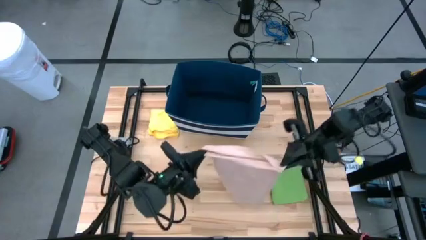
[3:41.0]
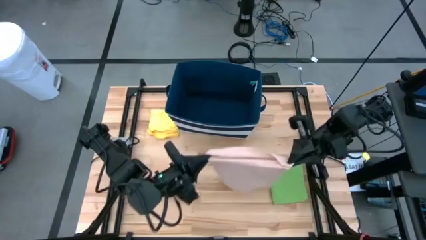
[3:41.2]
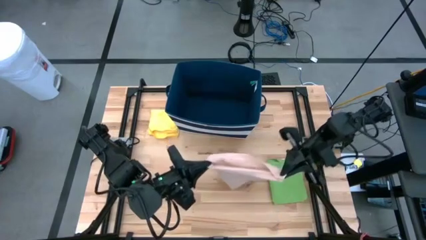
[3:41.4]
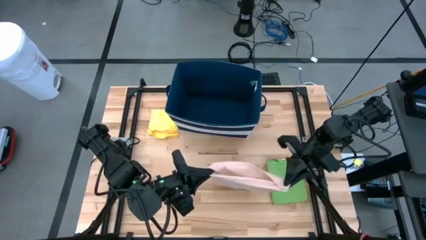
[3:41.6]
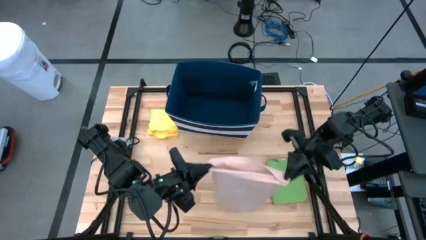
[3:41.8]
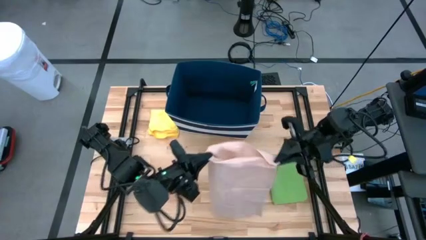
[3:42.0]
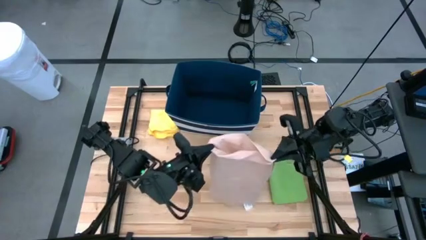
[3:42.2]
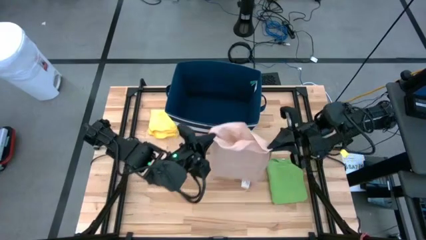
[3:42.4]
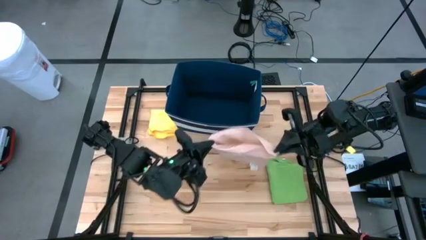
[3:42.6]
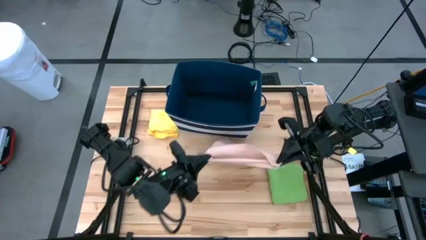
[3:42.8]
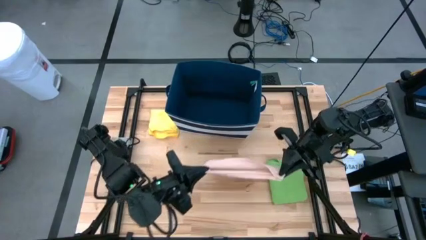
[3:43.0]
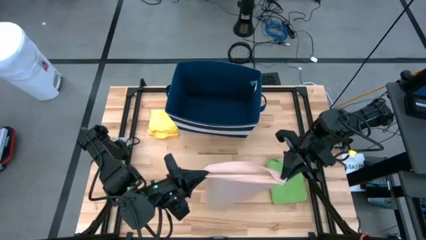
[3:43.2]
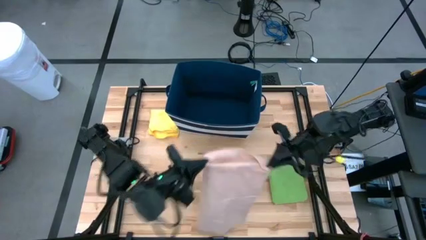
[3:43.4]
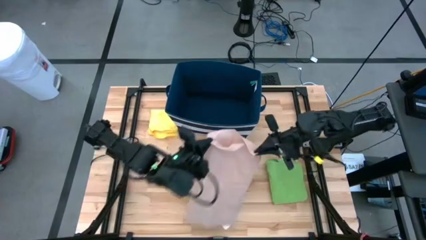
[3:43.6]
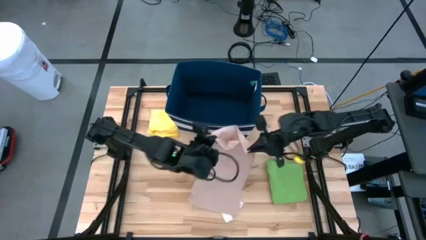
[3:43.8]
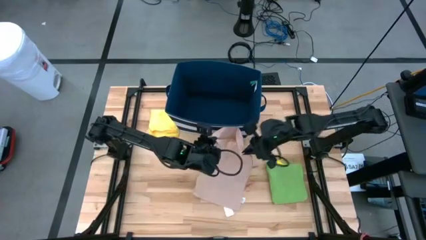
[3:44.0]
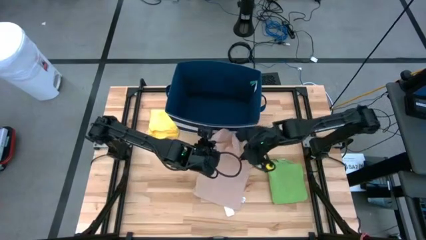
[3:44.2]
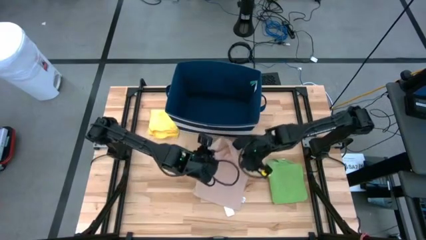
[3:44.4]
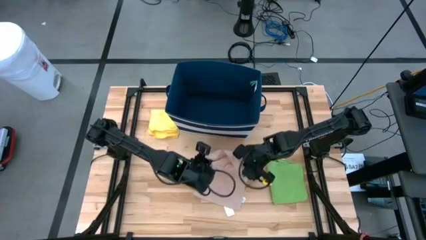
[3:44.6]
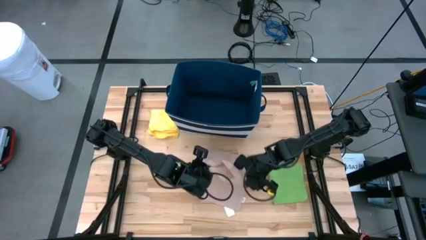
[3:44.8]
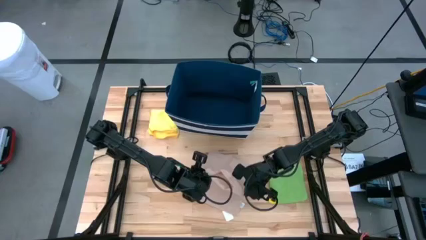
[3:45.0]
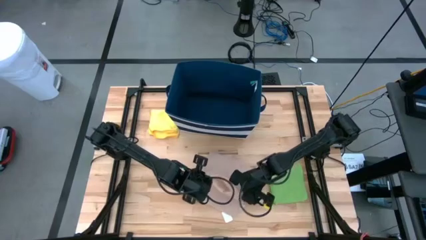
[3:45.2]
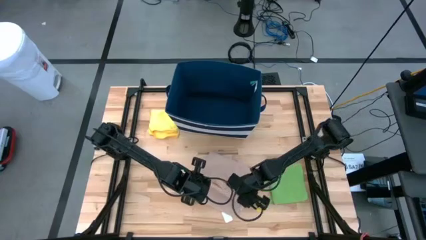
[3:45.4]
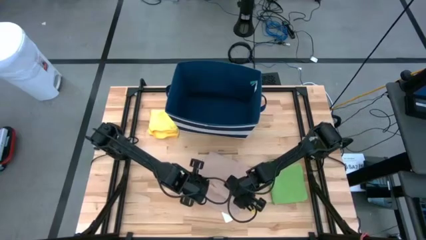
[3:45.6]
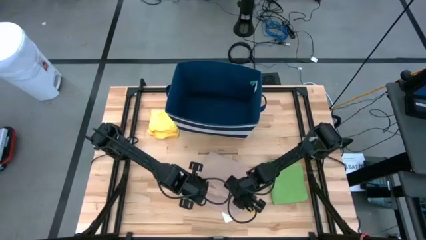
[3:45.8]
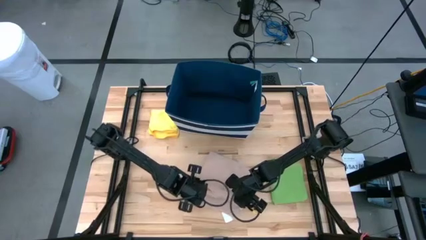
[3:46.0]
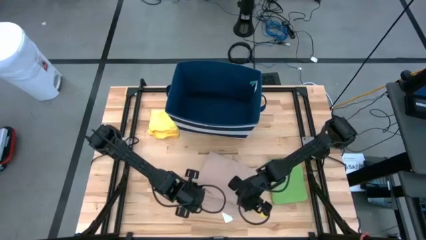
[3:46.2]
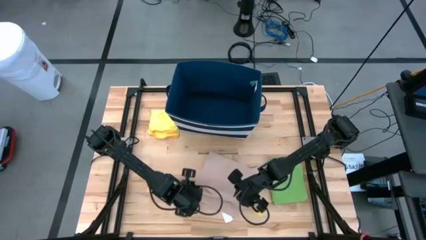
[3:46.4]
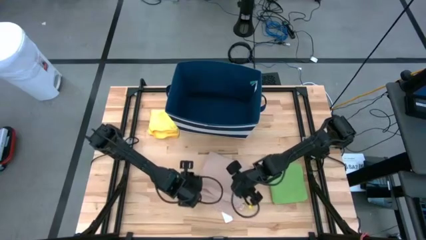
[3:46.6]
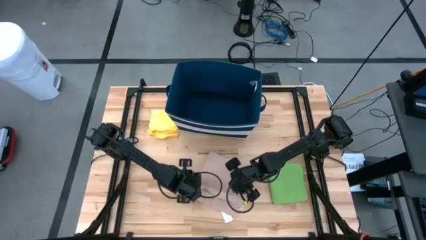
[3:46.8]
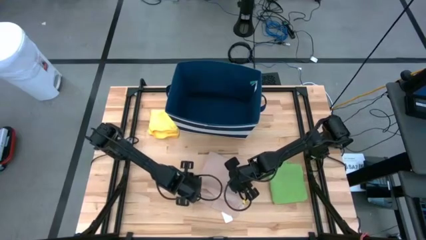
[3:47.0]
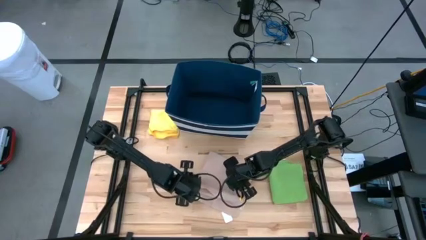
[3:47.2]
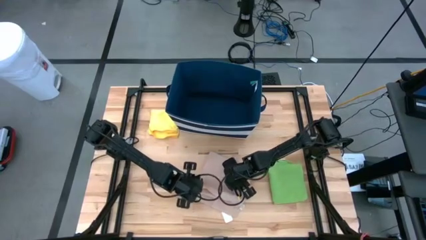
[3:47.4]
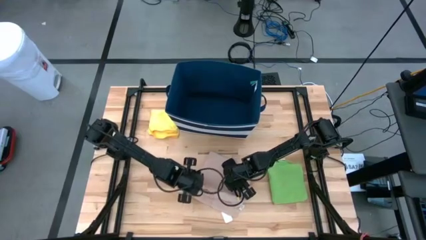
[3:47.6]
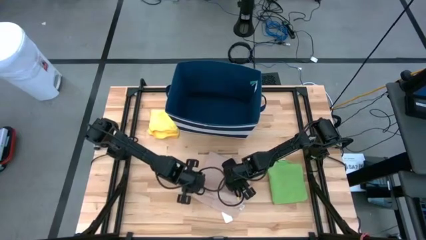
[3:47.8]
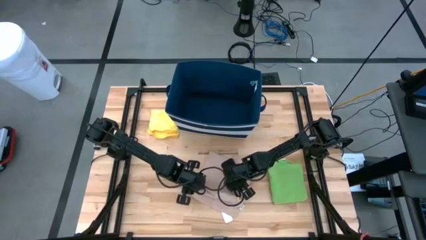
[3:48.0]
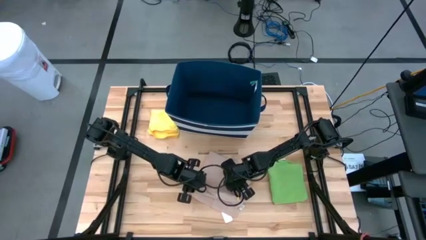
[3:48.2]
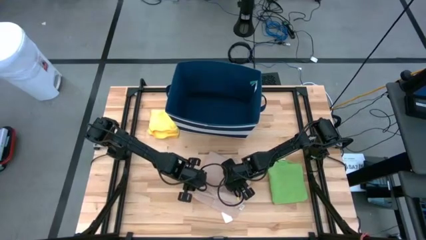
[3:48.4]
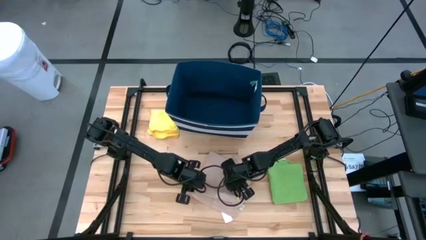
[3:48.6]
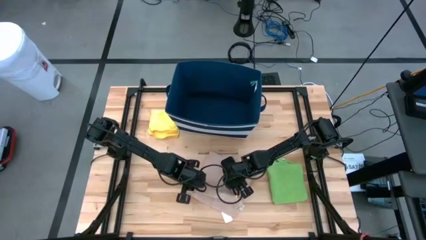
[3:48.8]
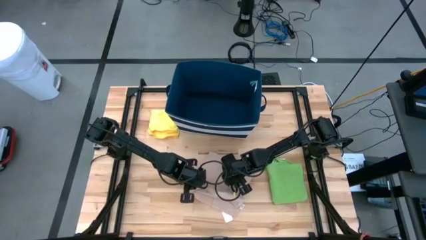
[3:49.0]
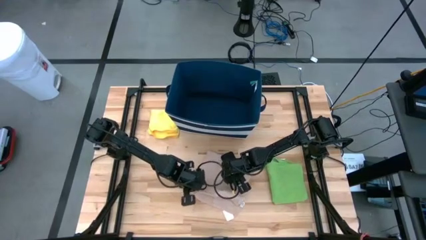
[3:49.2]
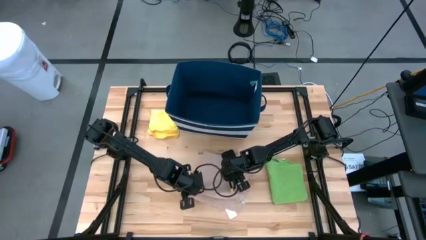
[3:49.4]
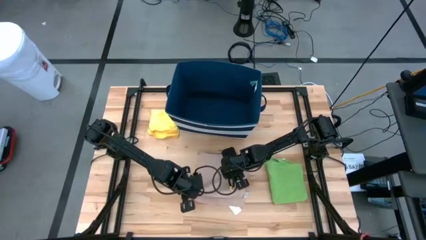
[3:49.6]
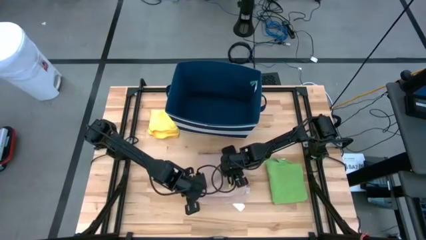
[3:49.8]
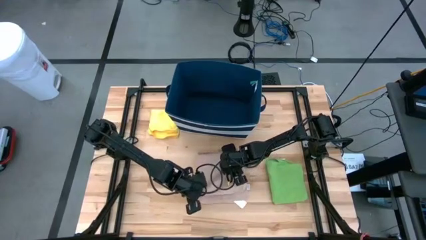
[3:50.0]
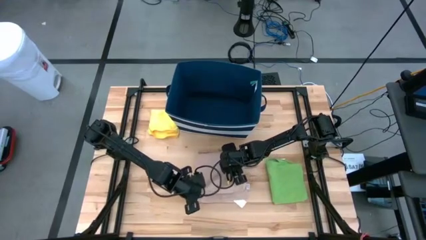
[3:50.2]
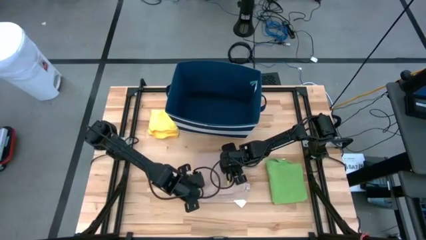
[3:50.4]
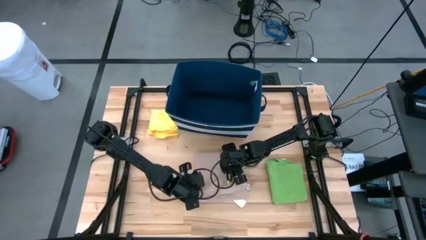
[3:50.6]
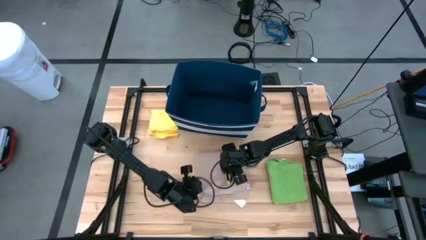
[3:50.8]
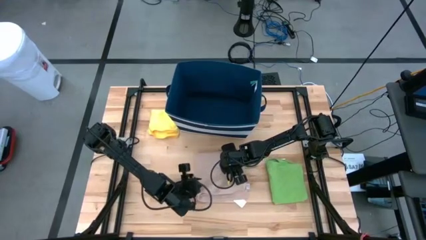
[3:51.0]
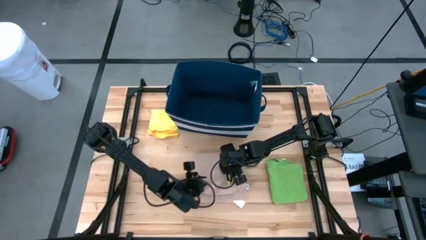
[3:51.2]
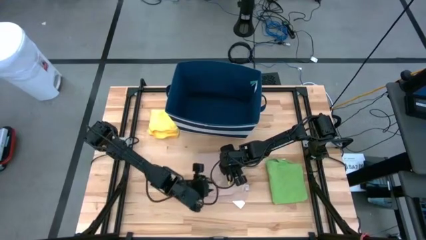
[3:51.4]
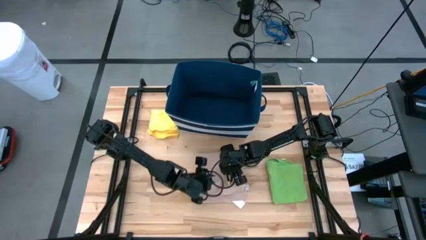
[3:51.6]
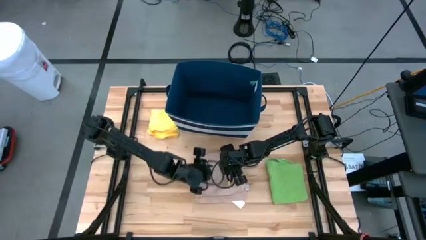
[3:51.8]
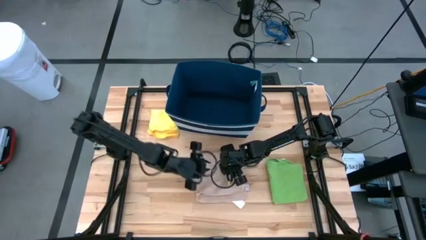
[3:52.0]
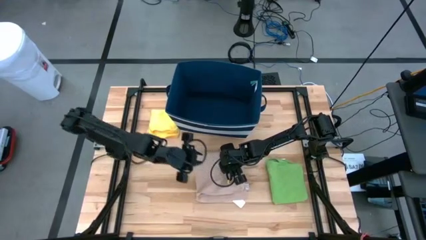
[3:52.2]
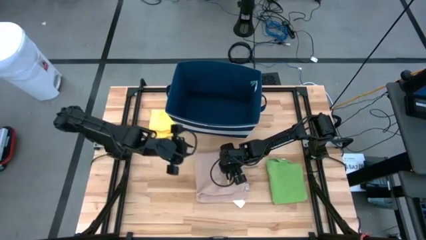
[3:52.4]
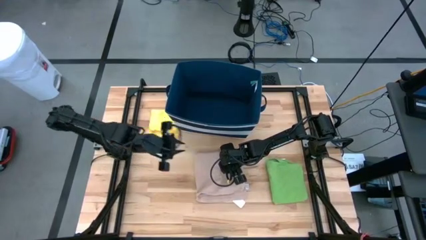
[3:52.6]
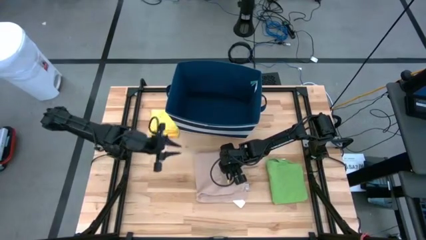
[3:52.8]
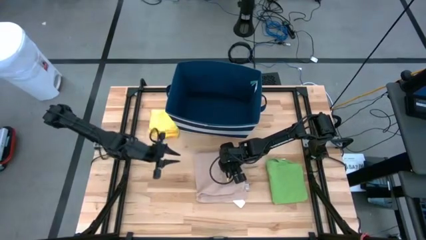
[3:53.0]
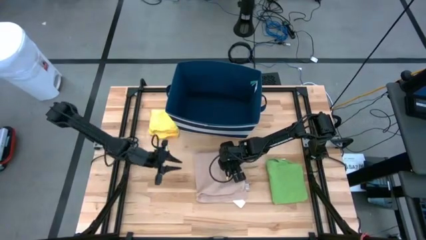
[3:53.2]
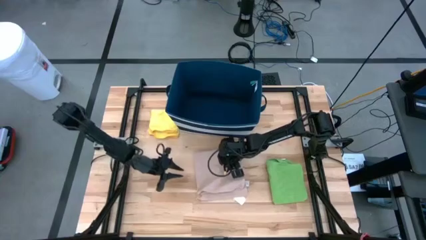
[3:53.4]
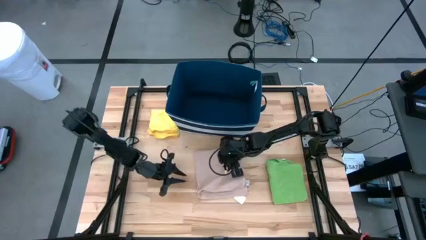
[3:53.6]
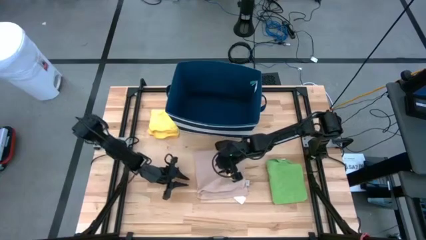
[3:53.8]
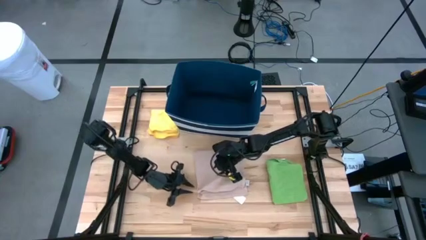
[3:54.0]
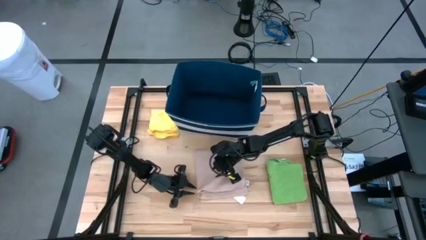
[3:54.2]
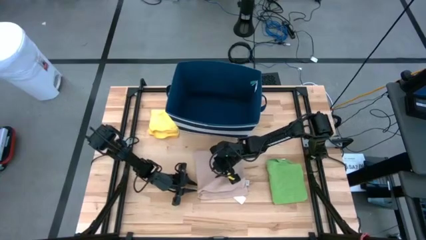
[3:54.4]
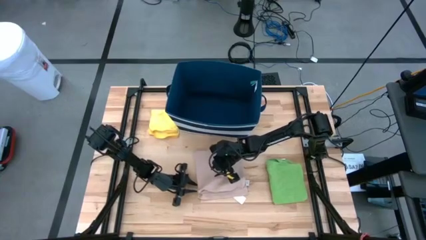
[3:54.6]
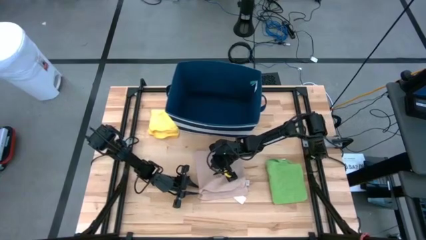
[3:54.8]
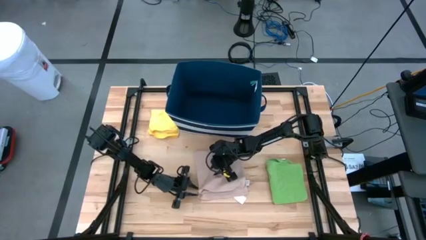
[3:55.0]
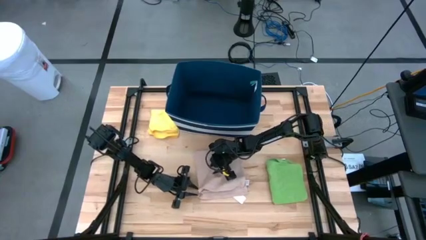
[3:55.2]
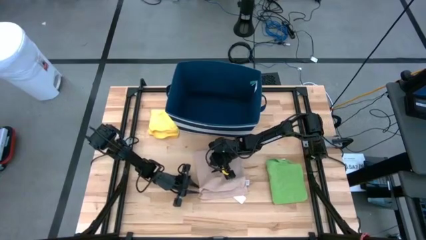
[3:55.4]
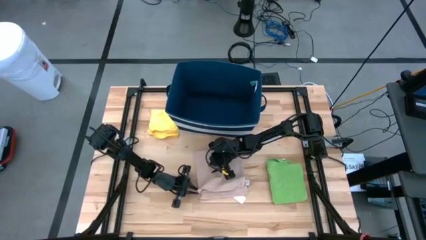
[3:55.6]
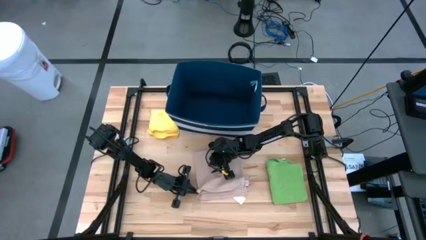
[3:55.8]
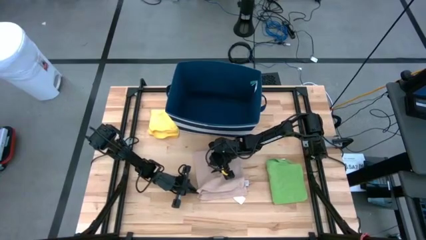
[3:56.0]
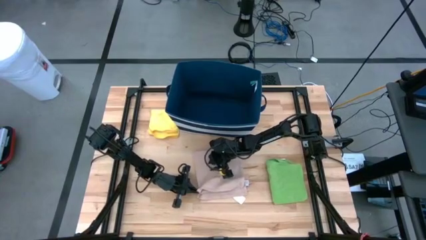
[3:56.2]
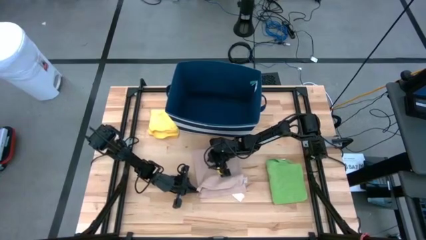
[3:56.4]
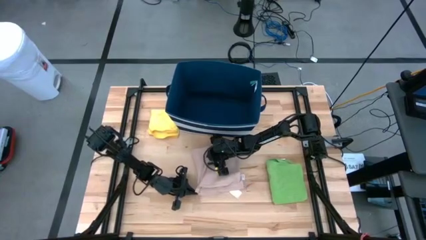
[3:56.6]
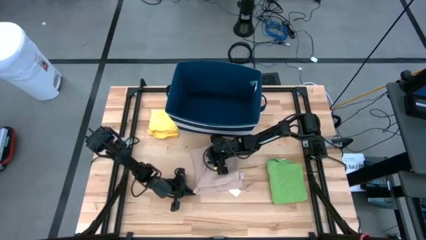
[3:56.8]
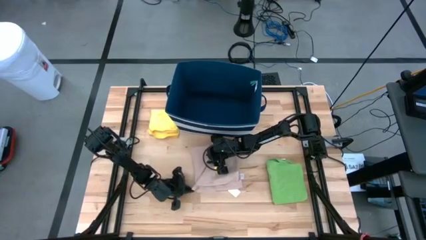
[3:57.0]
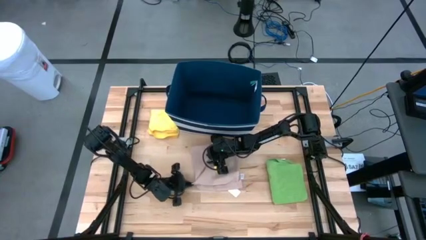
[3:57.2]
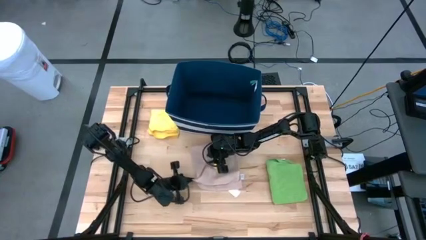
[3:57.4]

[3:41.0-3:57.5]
Task: Fold towel
Fold the light pink towel

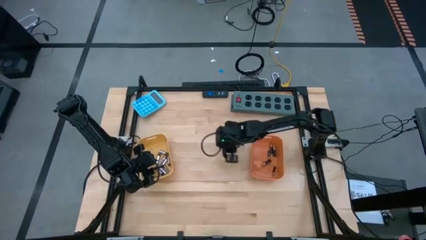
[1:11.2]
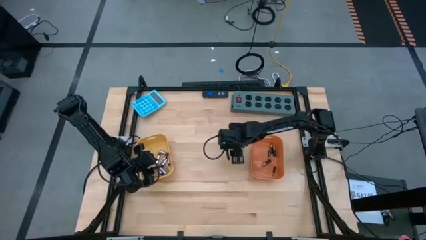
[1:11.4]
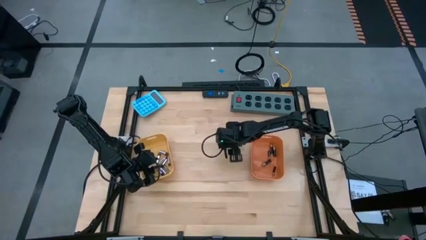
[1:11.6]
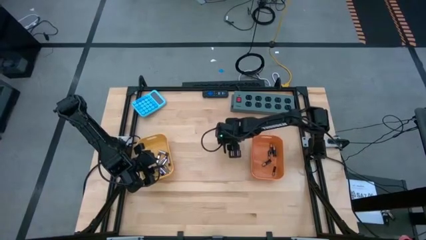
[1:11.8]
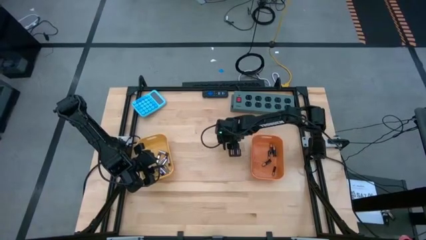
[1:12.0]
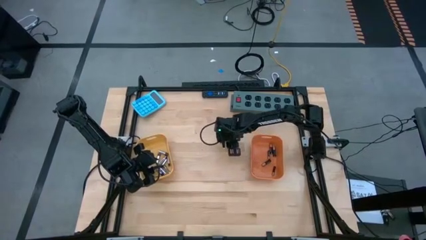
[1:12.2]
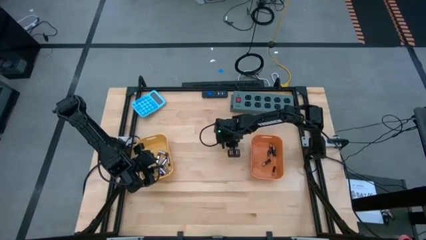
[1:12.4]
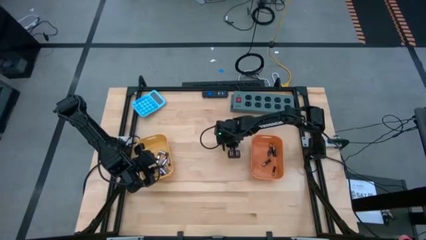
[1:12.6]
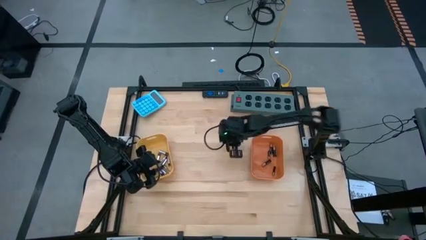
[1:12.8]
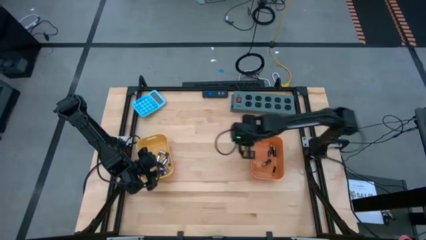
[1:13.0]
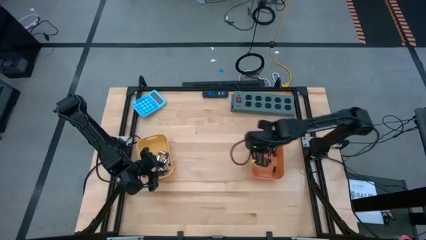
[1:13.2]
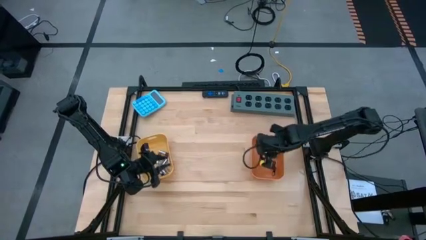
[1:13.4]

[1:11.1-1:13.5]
Task: Sort batteries
Put the brown battery into the orange bin
